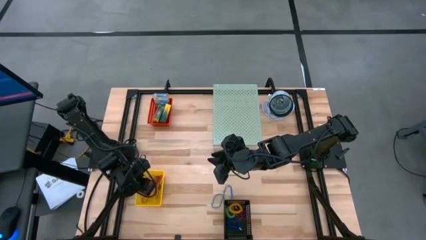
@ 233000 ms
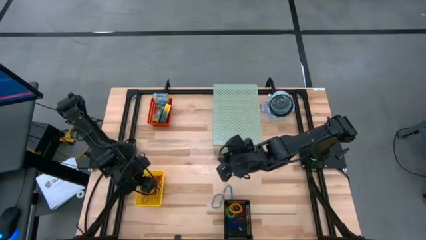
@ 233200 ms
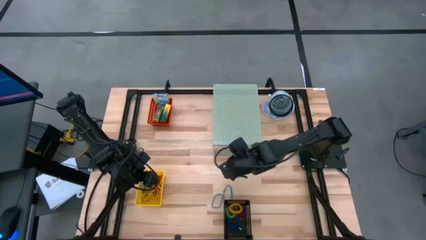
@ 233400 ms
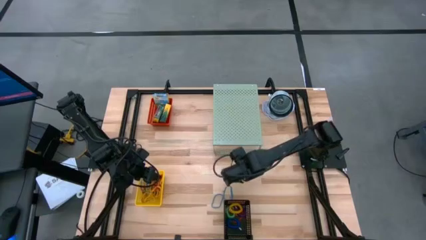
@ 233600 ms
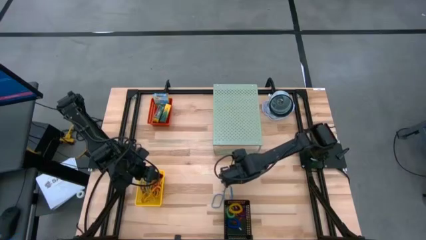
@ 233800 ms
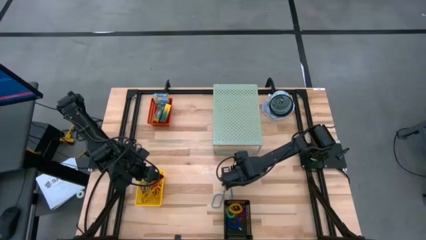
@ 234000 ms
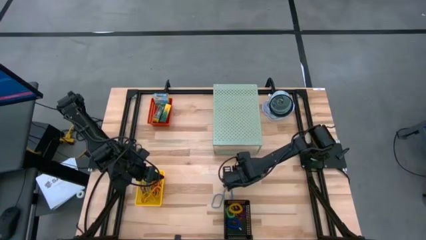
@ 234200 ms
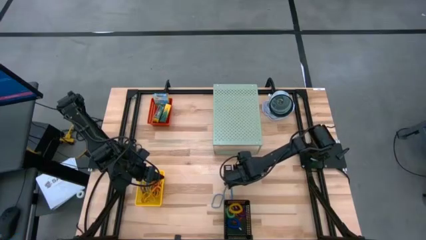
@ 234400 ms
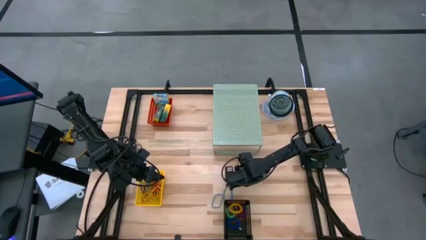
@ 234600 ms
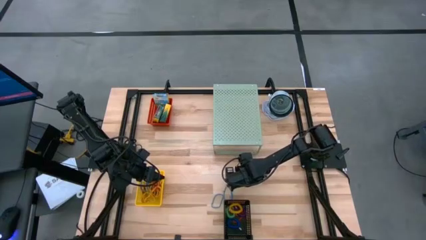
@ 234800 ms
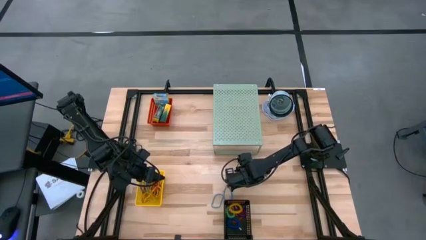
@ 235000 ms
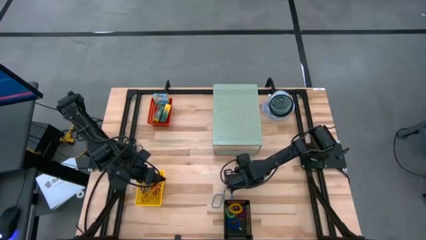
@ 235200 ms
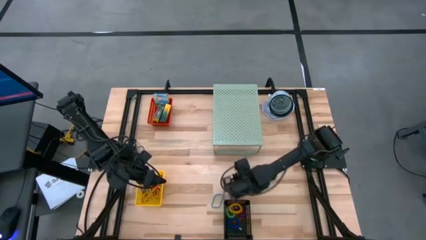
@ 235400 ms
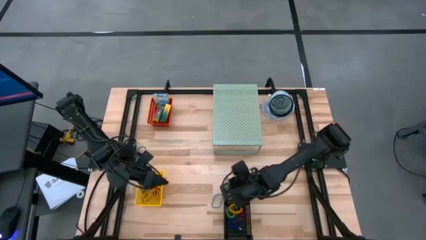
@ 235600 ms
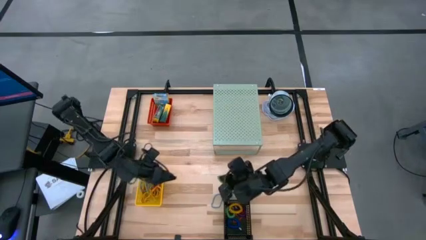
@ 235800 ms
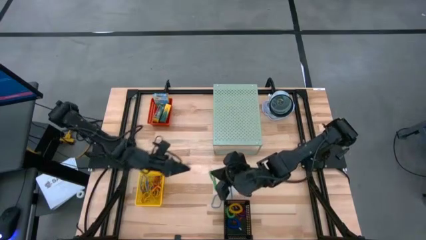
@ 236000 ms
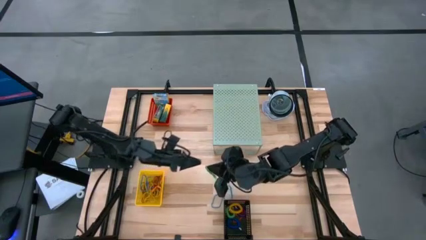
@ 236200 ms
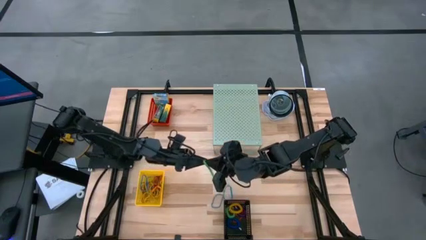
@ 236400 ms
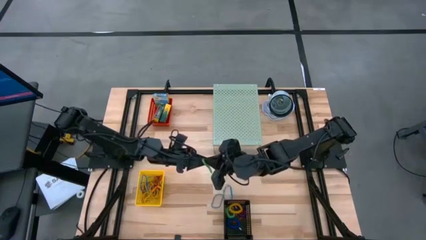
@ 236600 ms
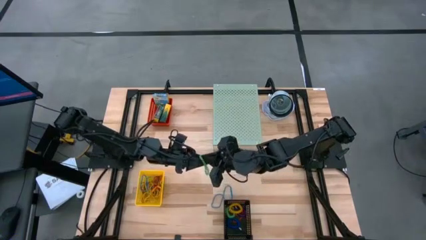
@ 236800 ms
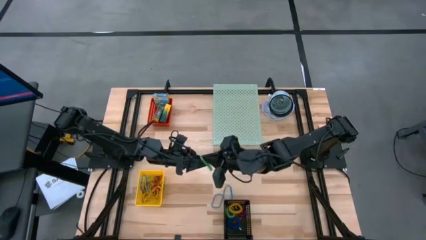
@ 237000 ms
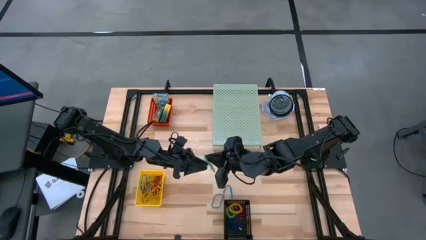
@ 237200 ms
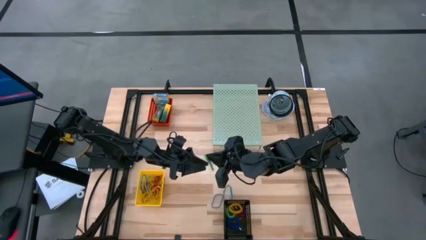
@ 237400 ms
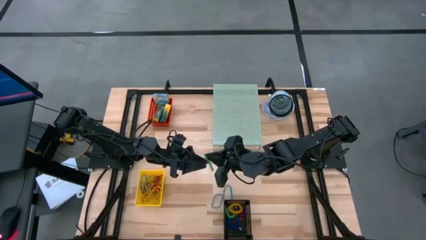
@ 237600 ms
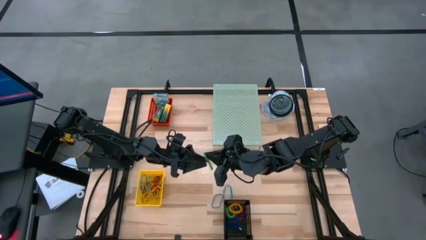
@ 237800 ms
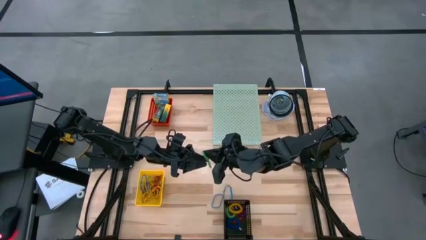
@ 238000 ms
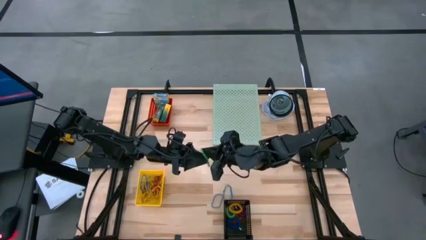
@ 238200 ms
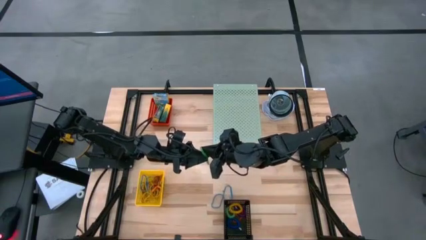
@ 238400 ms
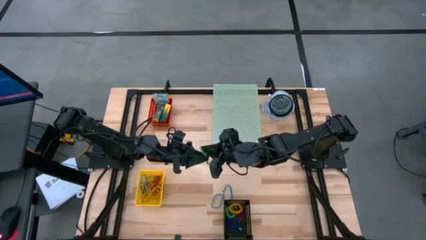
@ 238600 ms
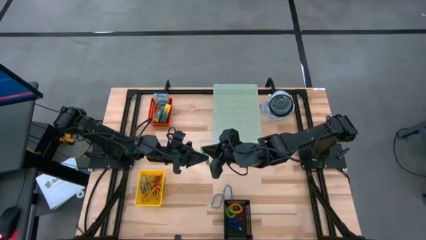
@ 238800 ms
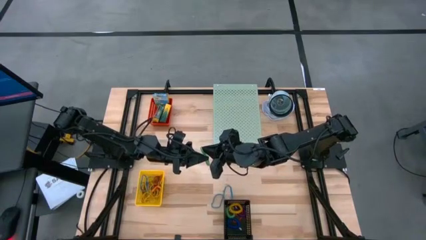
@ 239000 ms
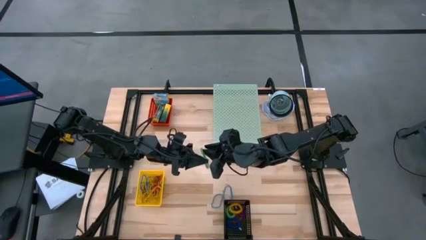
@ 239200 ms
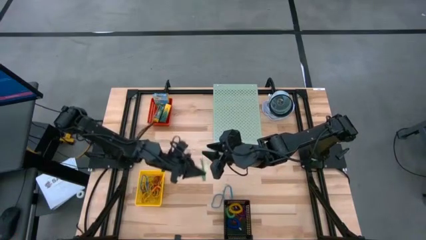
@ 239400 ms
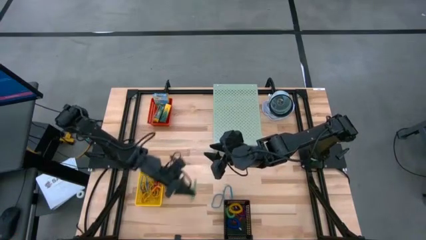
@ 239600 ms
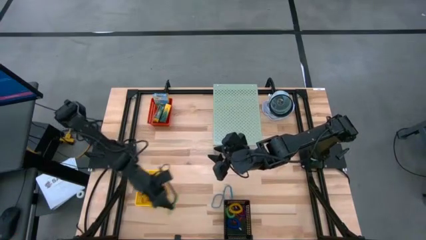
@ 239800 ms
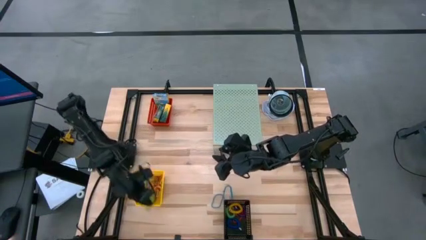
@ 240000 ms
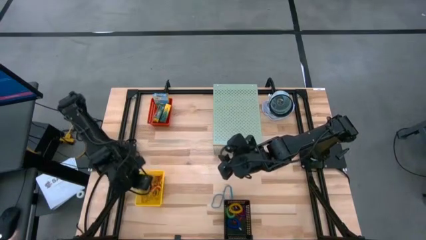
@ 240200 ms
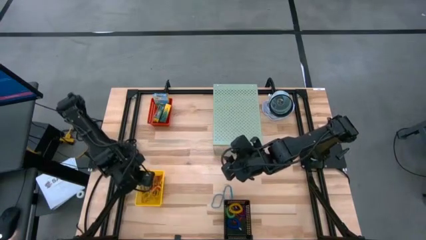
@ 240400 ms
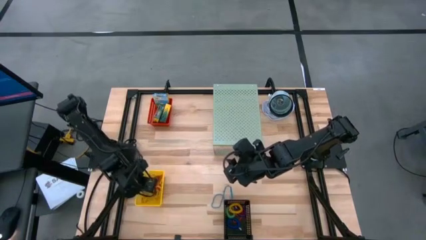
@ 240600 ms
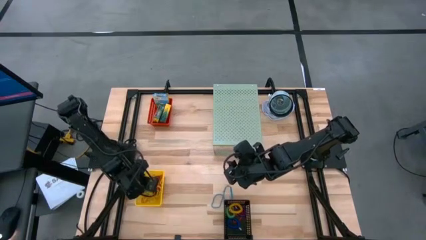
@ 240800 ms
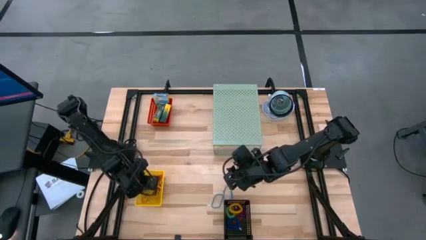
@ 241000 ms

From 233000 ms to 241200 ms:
Task: Pick & Place Office Desk Supplies
Put the green rubber band into the yellow bin

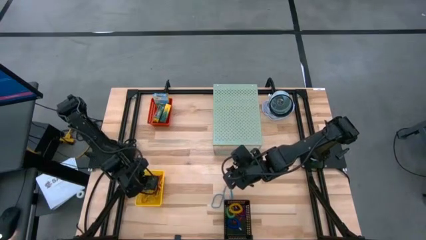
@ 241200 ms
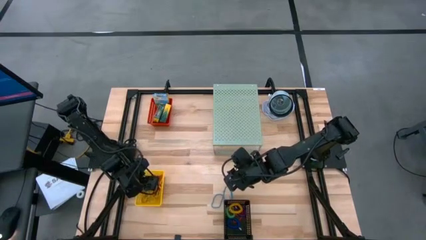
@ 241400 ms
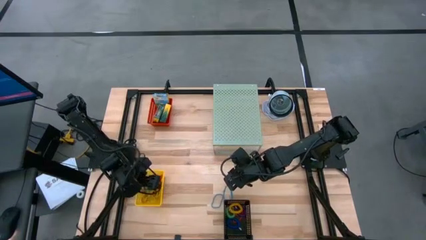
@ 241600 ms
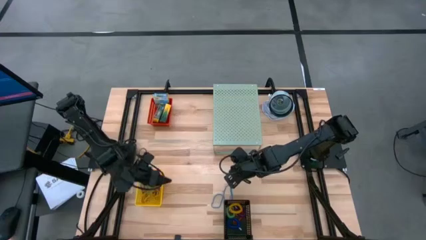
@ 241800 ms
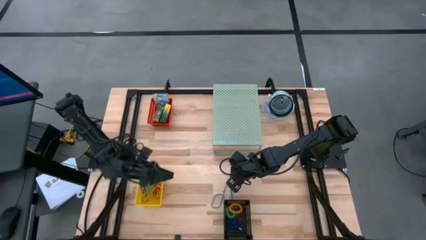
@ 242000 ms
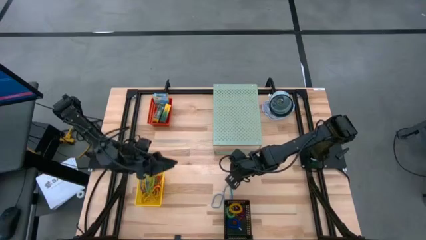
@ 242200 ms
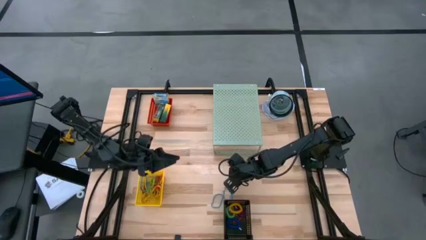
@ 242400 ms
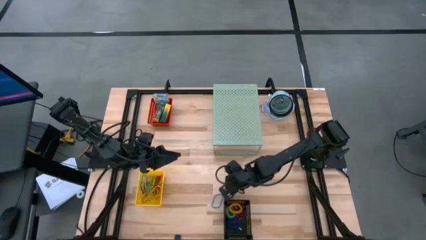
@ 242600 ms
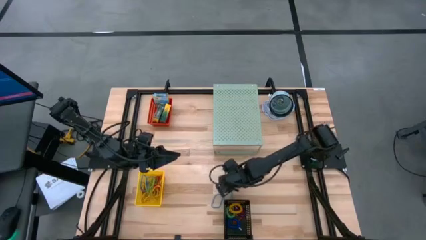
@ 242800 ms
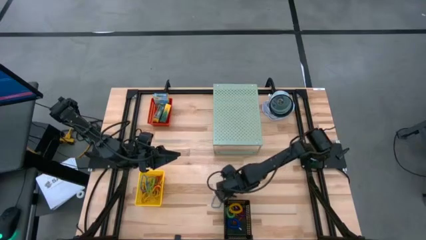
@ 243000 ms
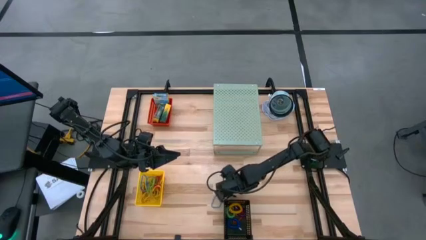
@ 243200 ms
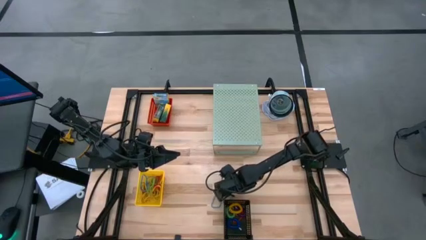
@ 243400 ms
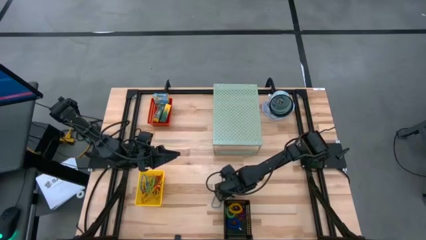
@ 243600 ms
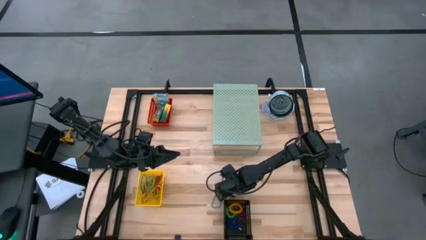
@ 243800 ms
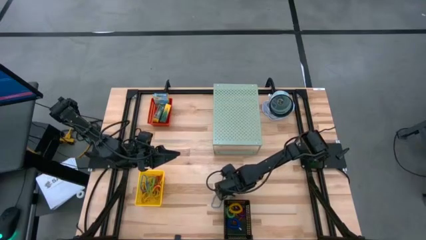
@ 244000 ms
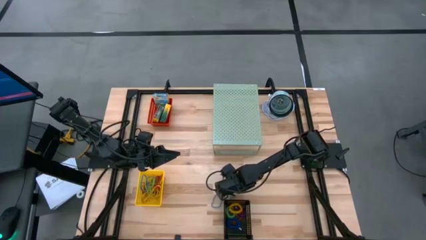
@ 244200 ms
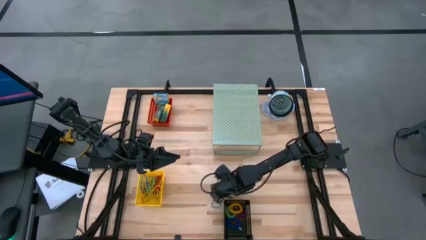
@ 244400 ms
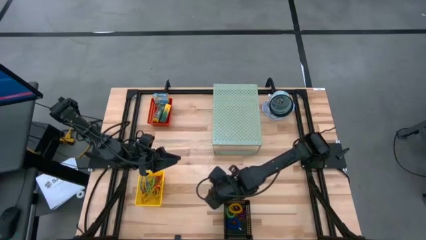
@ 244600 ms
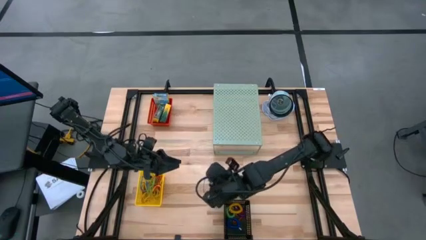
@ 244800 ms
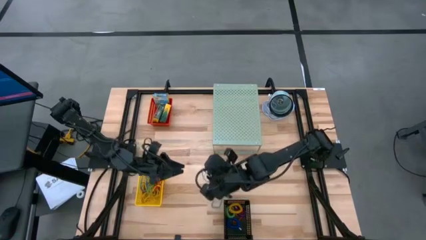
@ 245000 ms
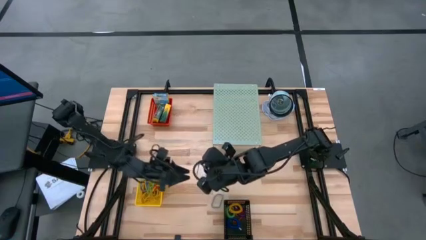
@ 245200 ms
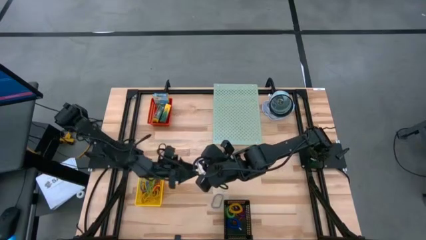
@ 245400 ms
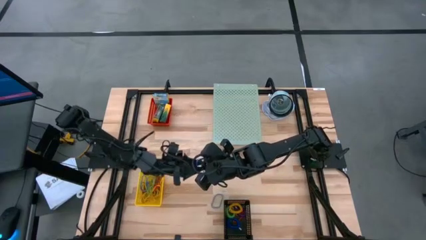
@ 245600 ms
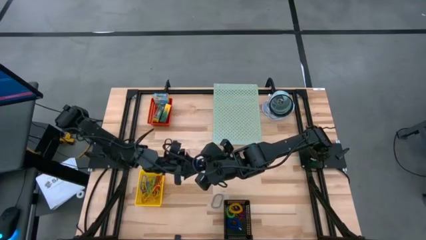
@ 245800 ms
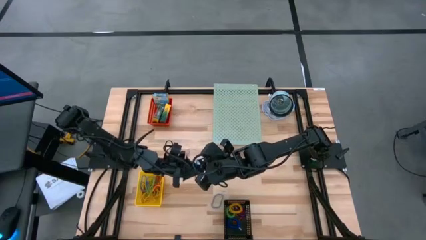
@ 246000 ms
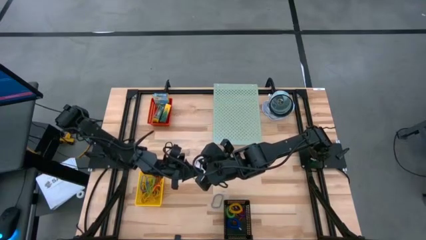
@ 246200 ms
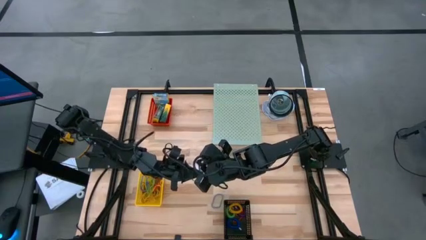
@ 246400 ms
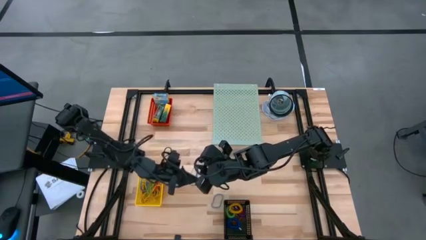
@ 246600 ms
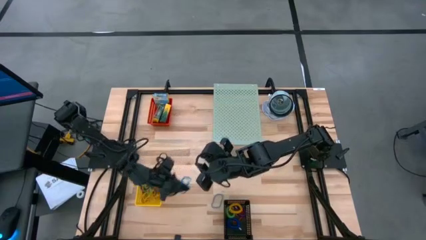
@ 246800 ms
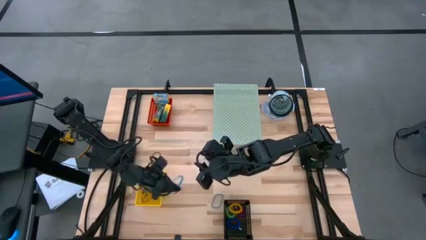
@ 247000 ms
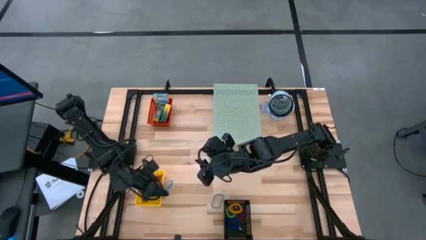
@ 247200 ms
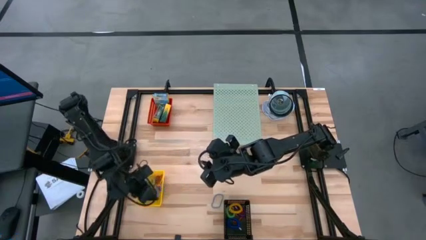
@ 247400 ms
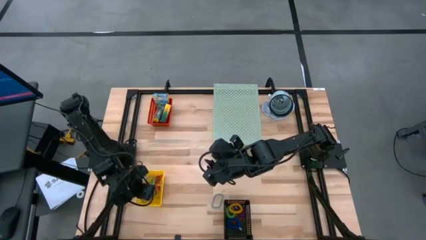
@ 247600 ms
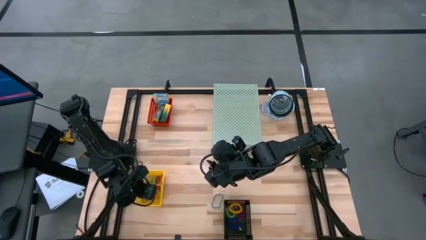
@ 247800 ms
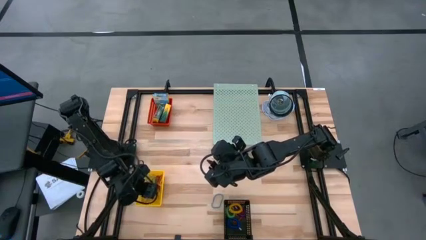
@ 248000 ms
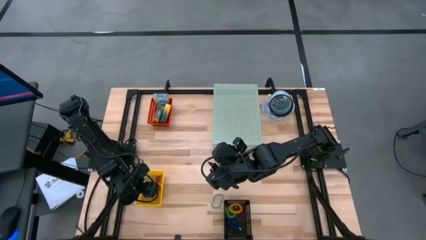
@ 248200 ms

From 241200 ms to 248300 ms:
Put the blue rubber band into the yellow bin
